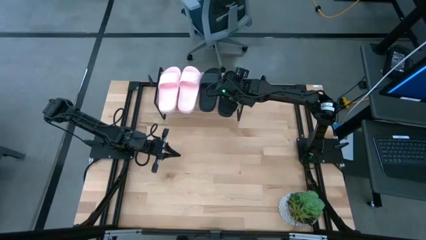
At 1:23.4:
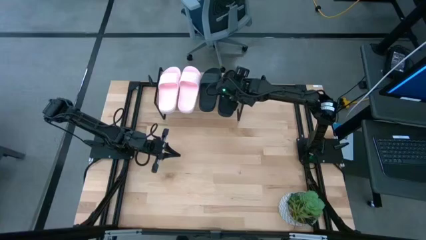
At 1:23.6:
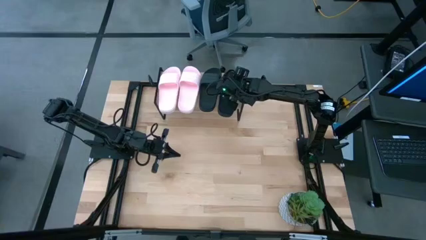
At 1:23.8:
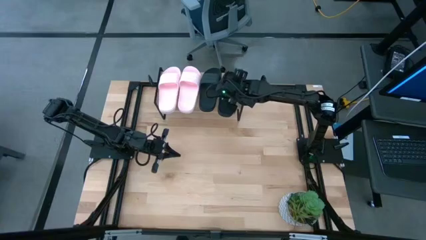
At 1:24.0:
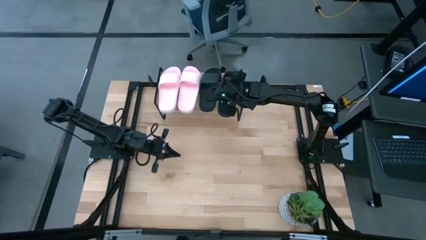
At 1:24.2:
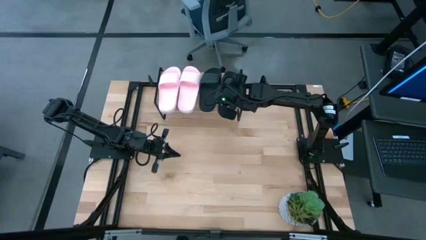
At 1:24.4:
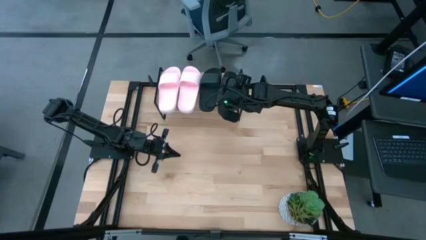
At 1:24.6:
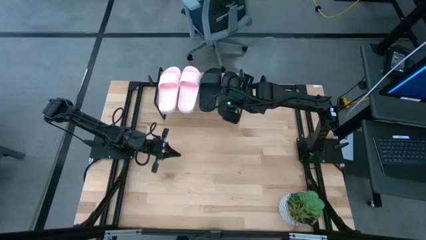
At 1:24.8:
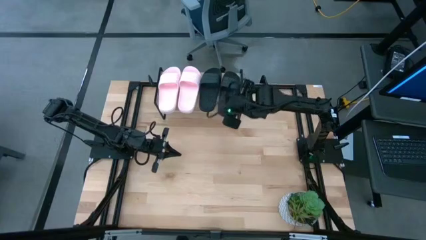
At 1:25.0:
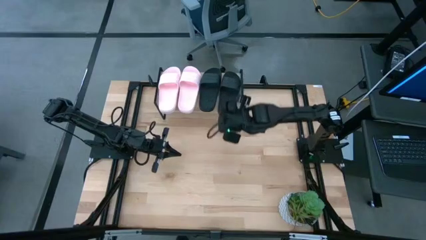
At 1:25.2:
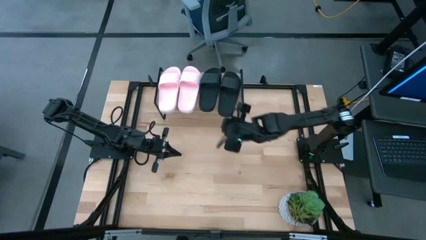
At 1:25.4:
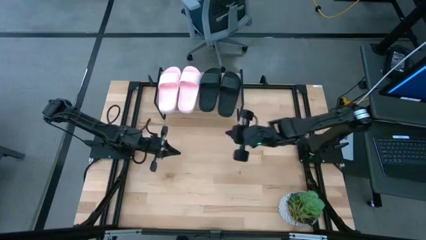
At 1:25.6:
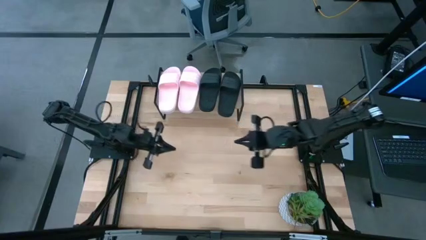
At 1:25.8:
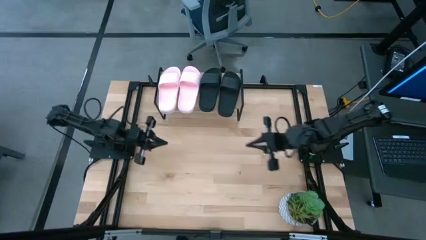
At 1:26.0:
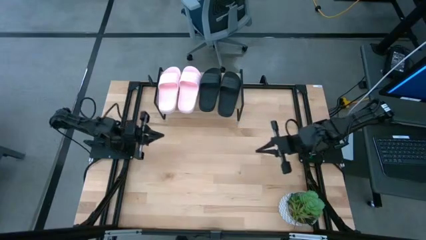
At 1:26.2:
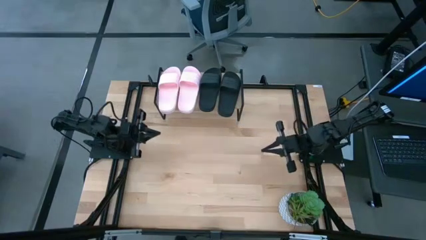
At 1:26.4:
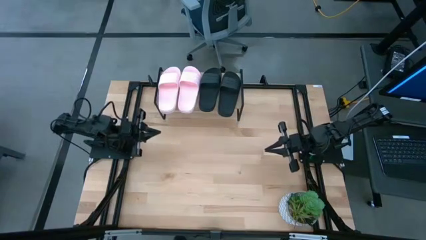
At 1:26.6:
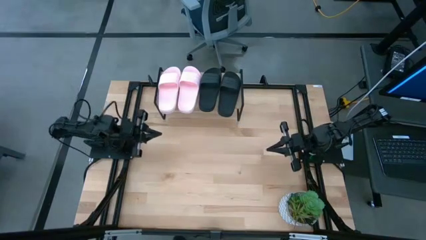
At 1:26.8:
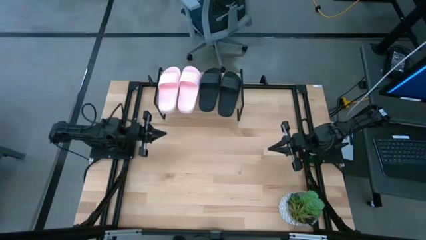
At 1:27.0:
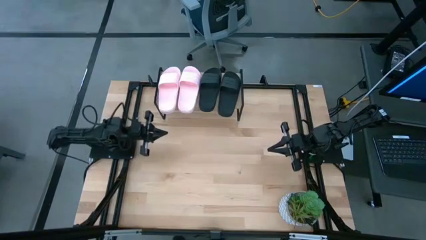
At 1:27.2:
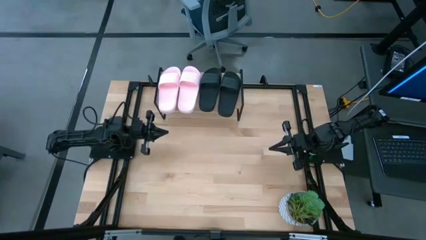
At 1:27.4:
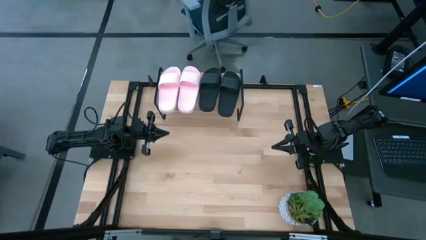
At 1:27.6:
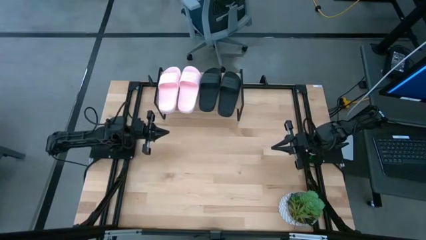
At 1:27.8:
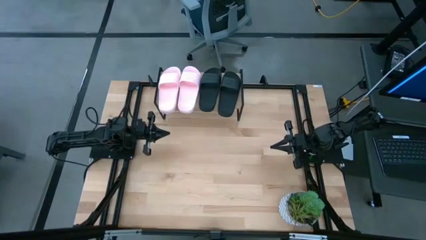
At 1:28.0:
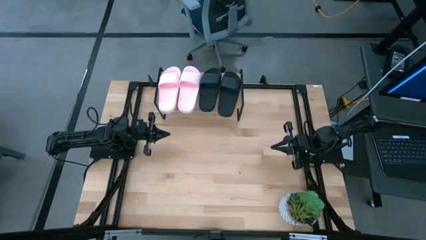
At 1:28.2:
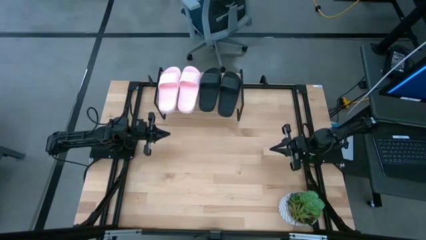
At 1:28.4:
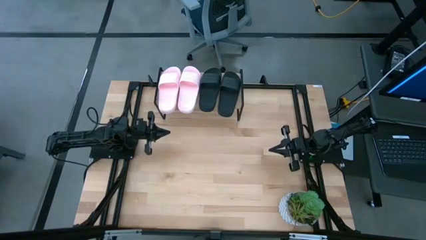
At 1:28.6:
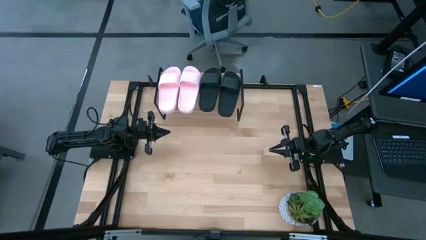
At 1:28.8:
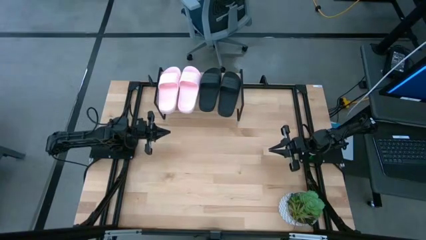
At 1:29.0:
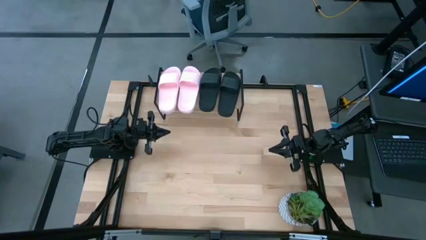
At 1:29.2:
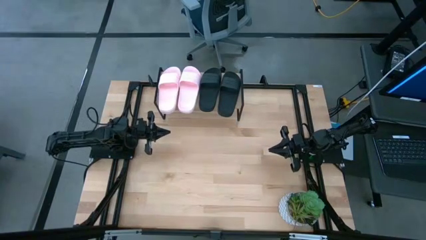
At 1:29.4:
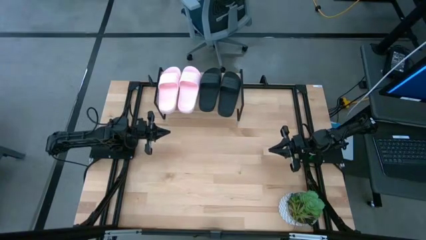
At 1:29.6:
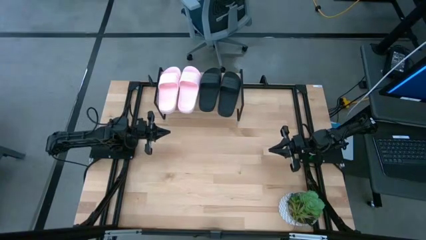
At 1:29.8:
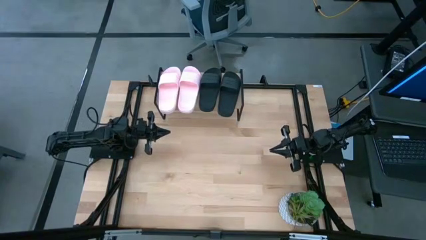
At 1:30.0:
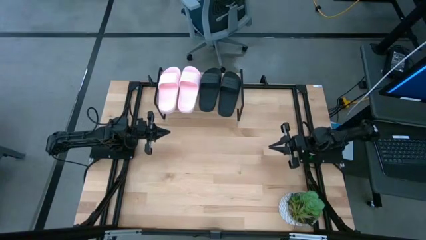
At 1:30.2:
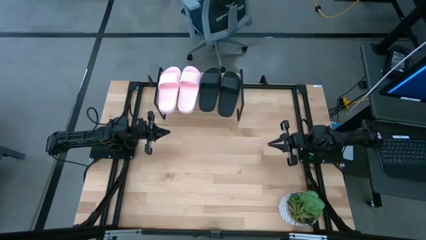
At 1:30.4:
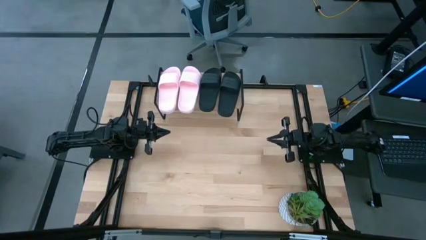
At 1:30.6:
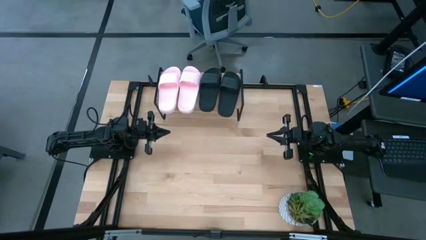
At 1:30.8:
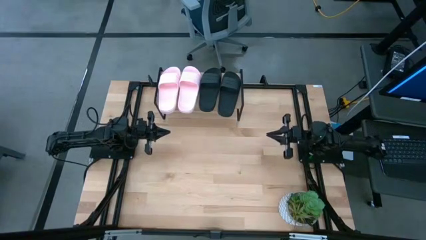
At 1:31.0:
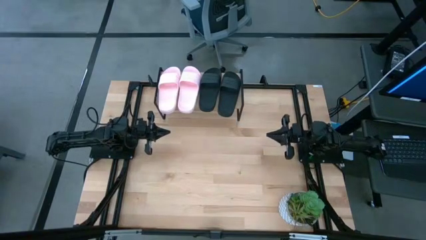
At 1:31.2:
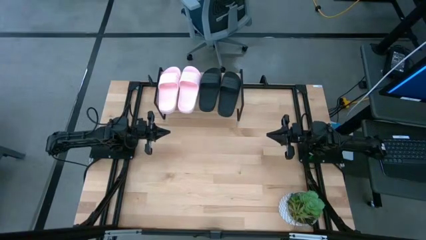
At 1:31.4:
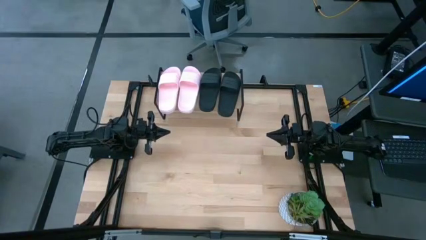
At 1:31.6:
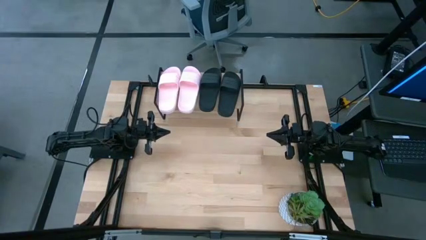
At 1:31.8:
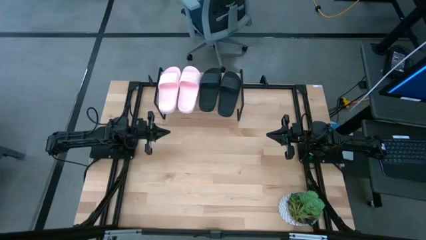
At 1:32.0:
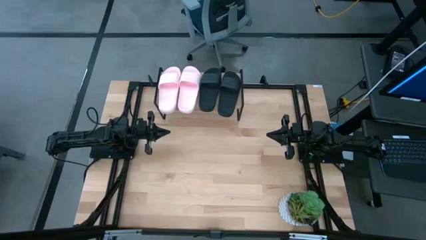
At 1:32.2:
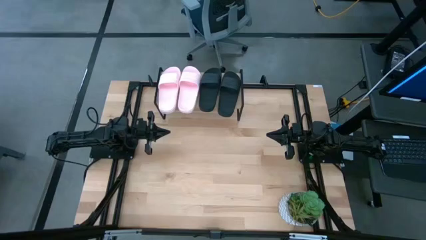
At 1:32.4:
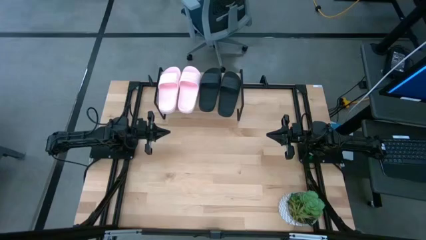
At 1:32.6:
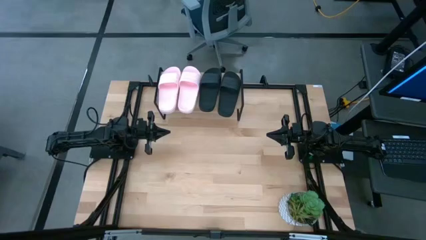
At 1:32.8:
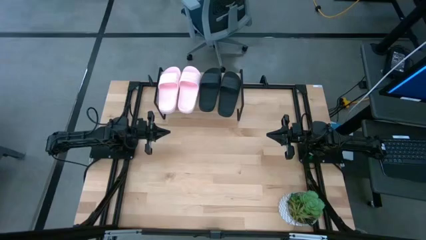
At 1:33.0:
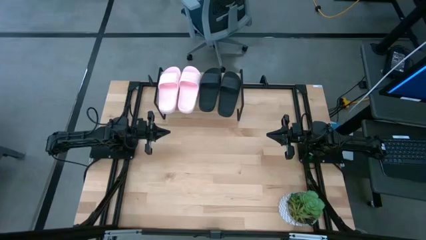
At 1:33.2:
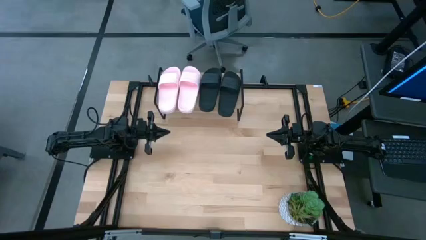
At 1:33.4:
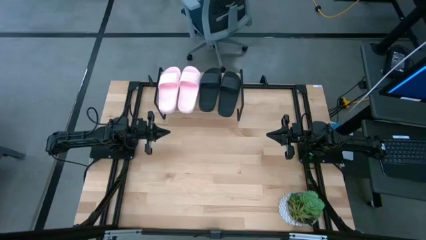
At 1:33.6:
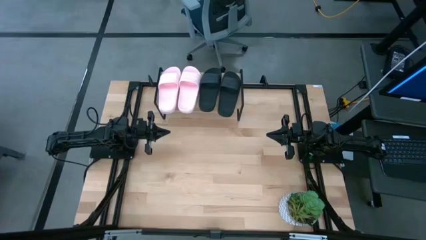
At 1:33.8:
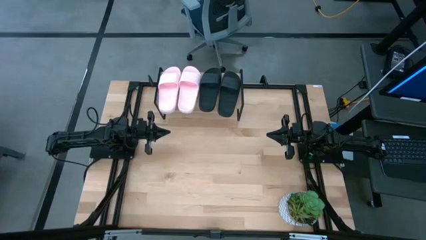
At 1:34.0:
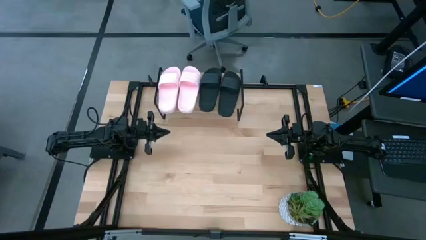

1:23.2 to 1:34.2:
Task: Pick and place slides into the shelf
Return to Home Position

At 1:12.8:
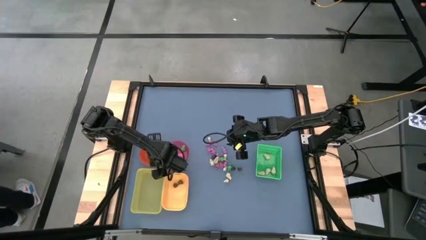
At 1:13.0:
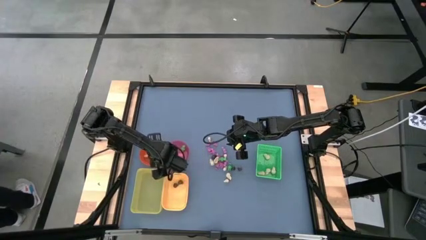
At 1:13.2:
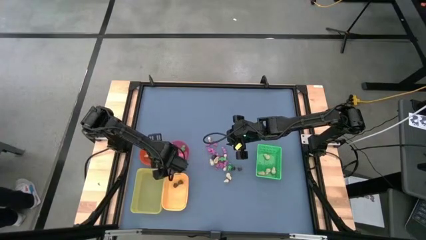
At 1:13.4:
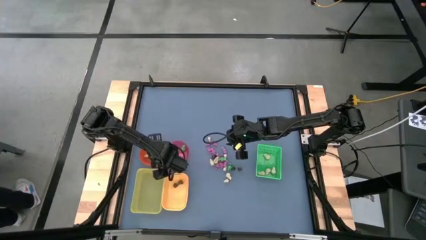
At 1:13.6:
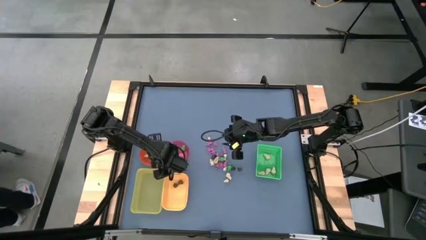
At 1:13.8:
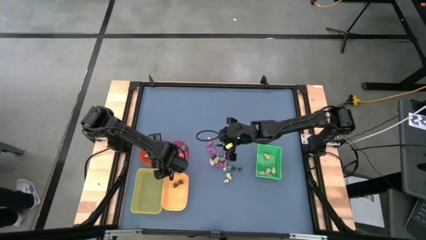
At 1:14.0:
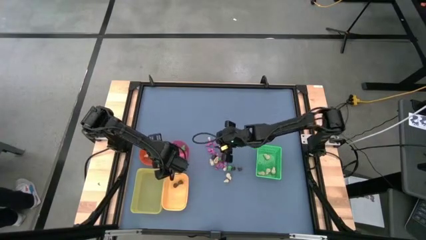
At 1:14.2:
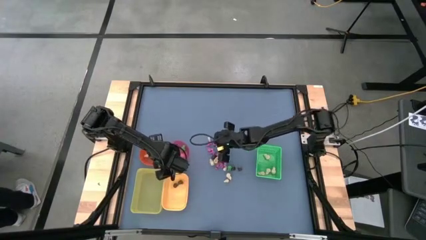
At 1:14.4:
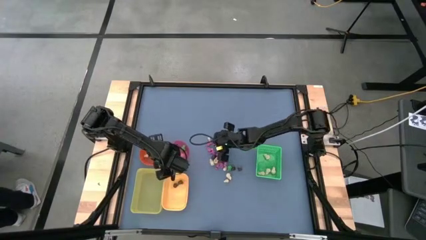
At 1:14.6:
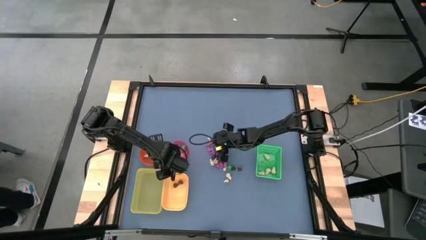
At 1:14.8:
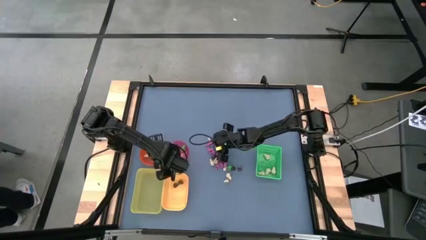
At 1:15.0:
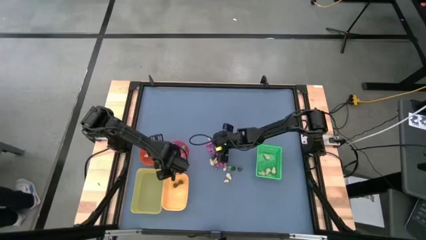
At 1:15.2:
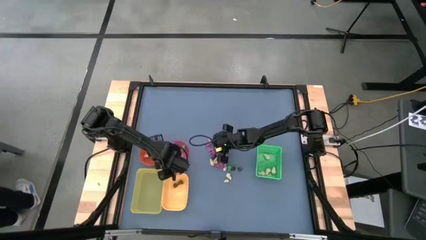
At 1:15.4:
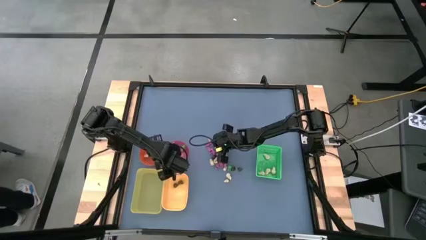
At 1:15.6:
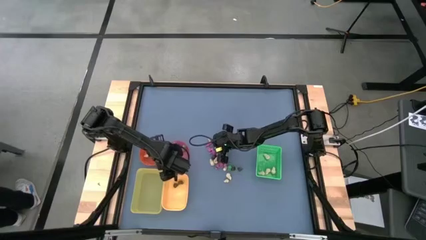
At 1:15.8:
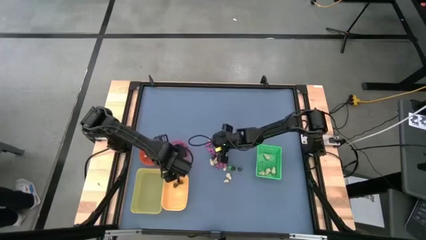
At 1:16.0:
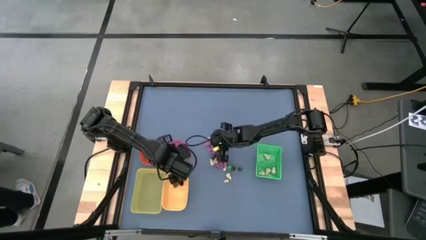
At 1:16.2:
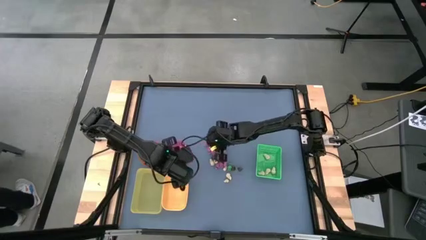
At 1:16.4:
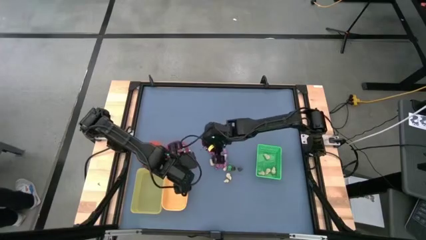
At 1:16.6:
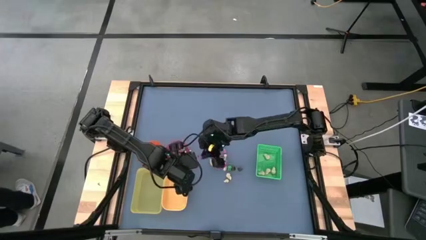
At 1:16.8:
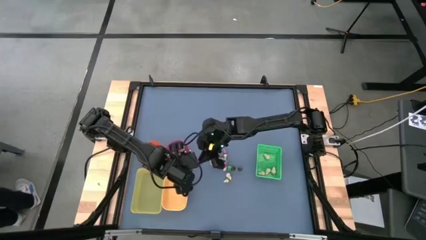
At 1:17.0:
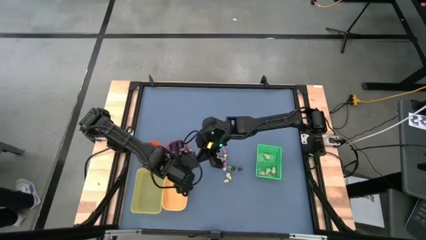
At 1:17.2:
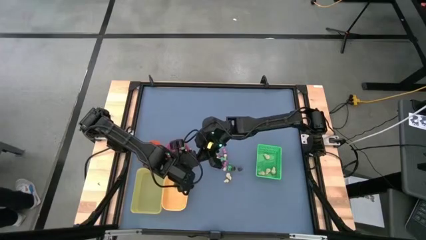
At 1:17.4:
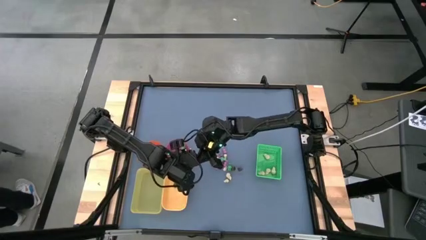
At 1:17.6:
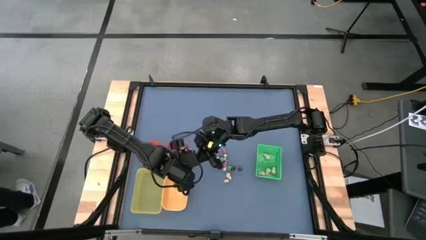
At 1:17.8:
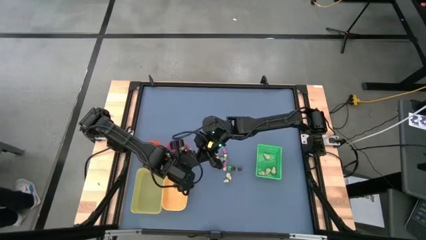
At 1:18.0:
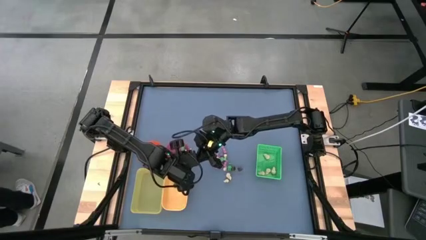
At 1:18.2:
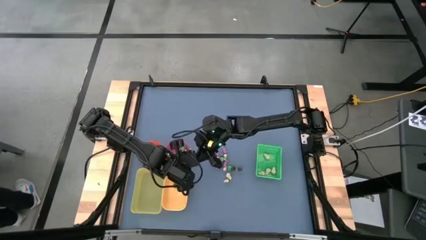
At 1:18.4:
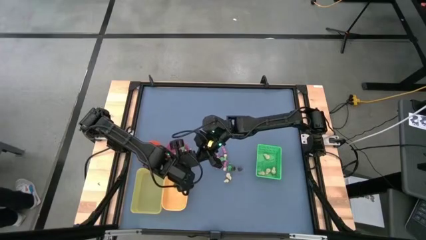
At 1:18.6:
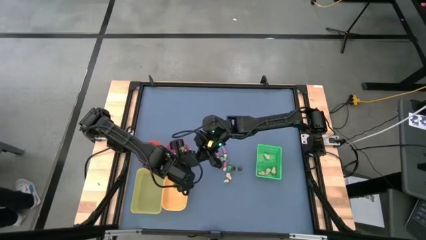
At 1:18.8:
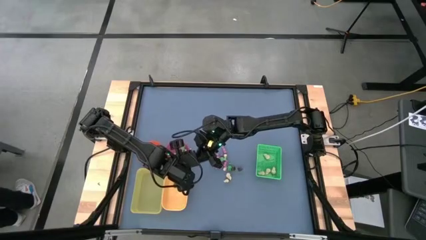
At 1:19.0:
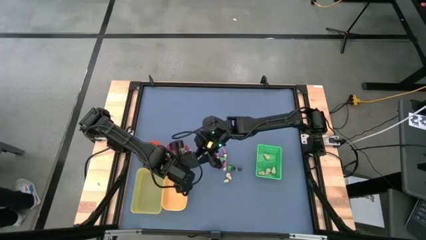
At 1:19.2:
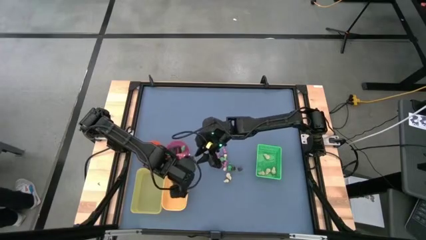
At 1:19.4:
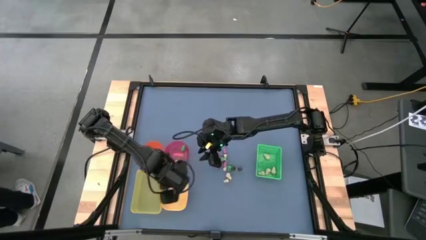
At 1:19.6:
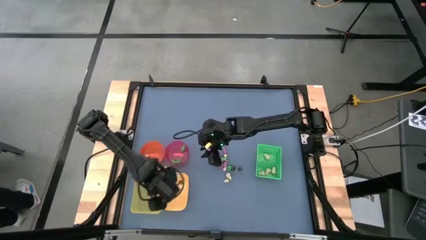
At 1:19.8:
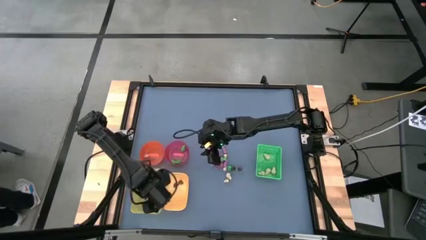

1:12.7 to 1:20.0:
Task: Sort Halloween decoration
Put the pink skeleton toy into the light yellow bin
